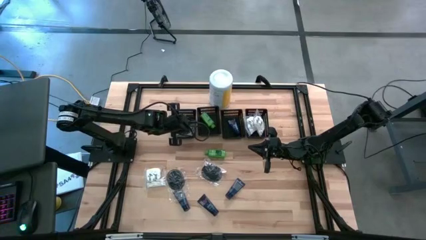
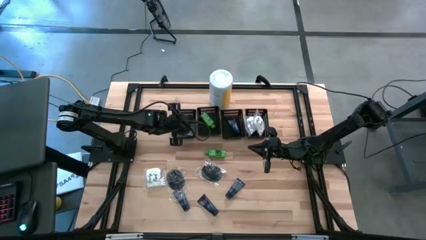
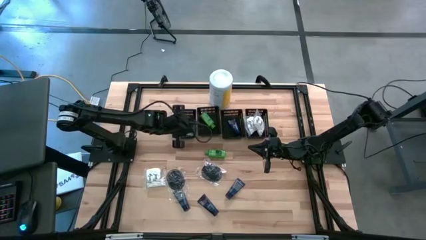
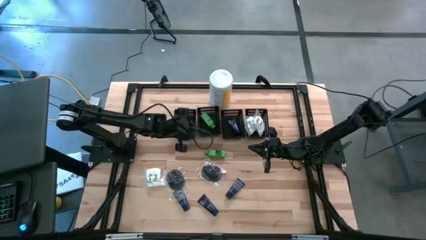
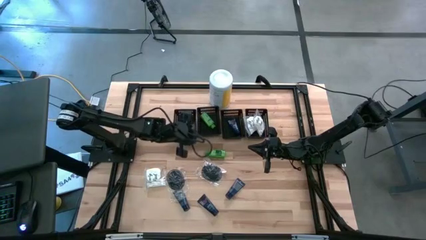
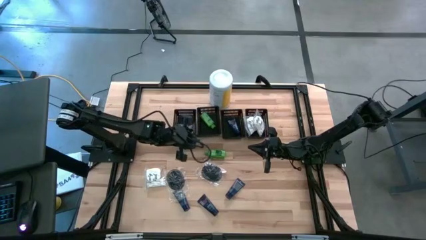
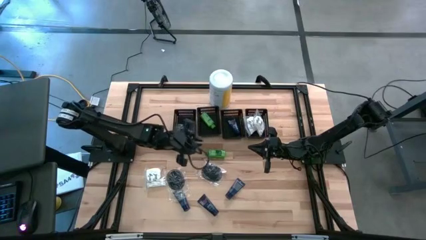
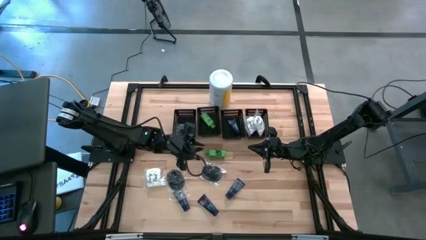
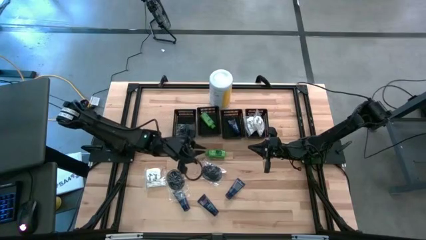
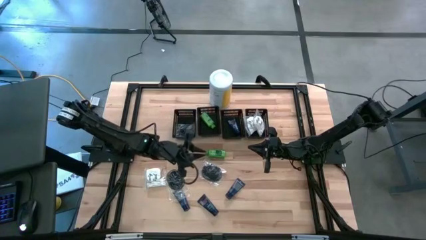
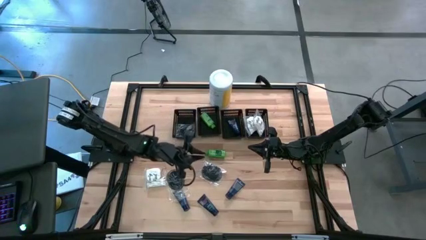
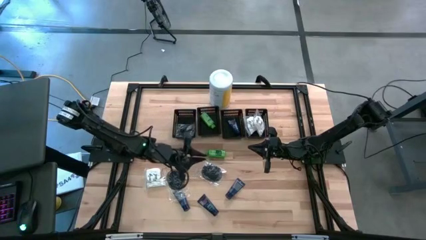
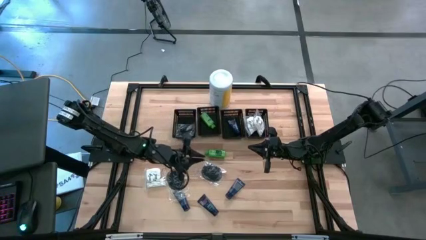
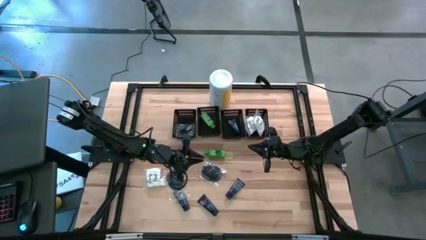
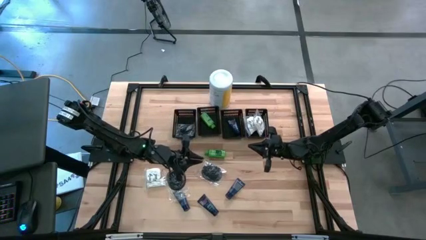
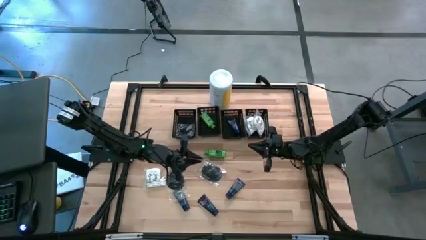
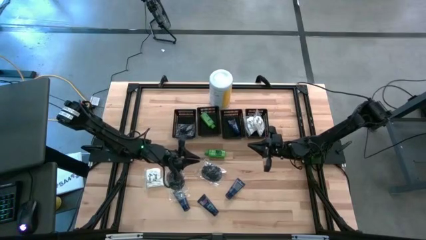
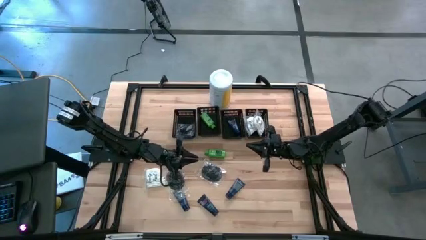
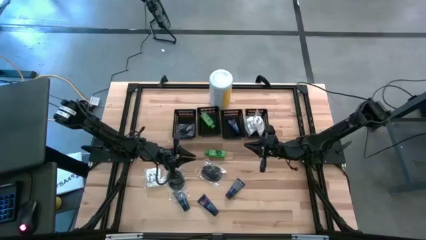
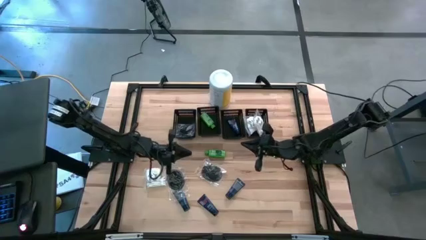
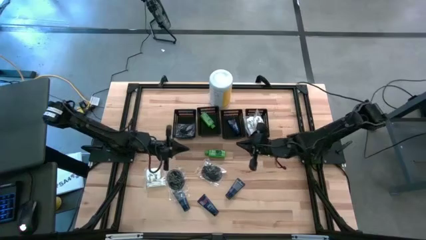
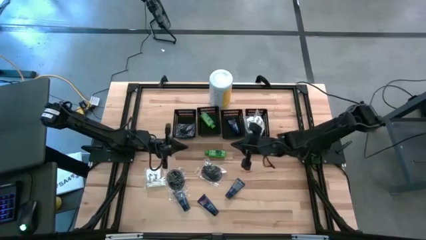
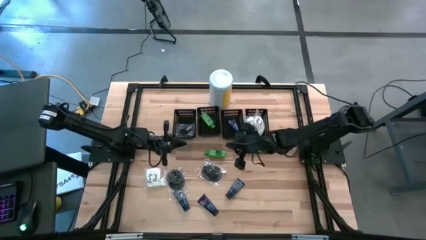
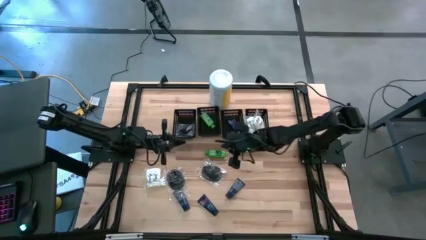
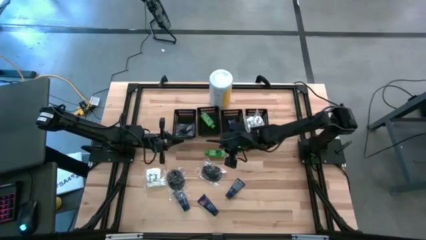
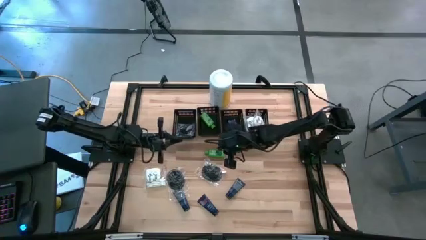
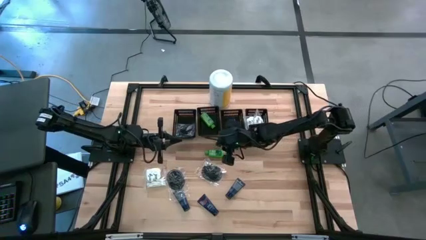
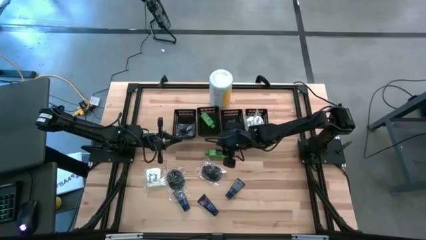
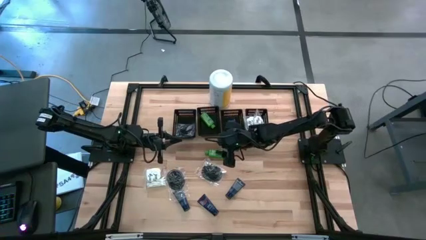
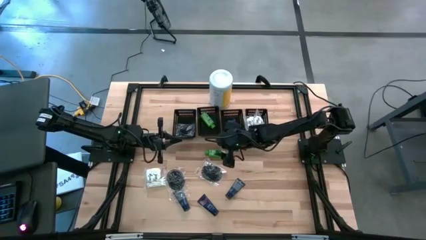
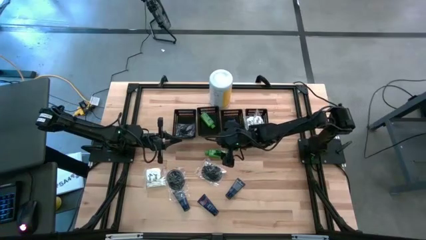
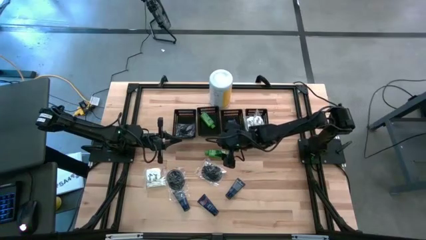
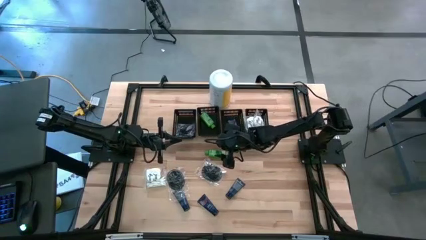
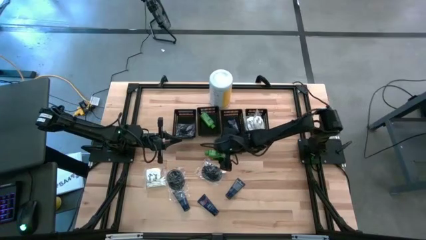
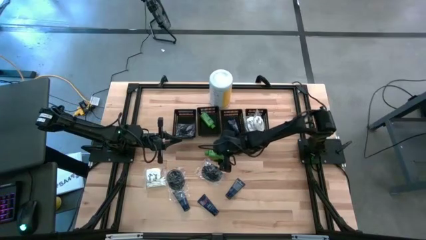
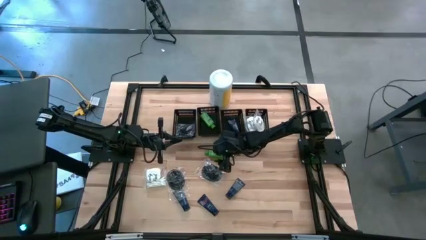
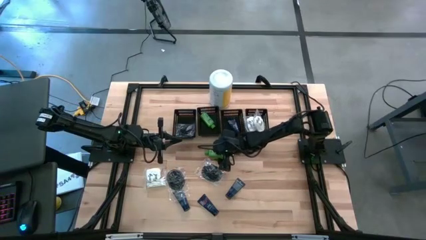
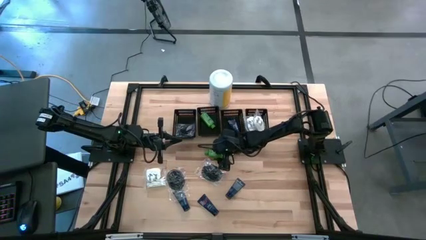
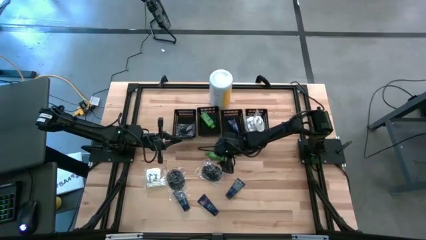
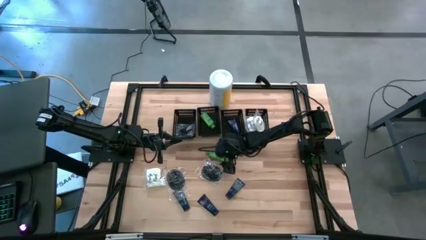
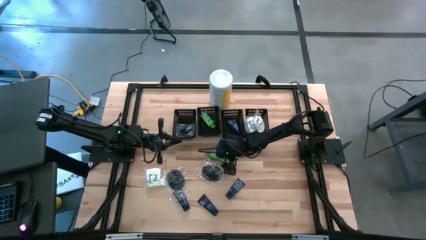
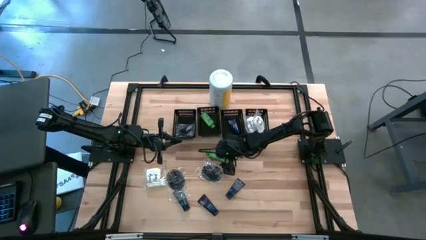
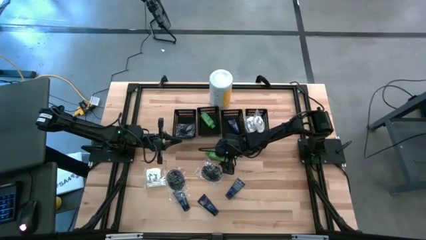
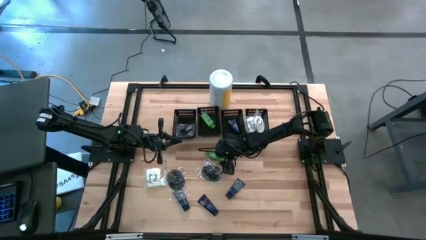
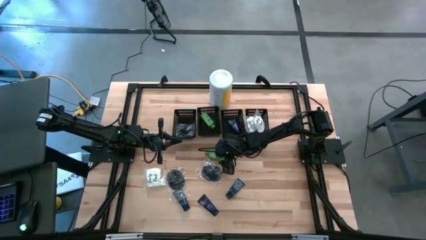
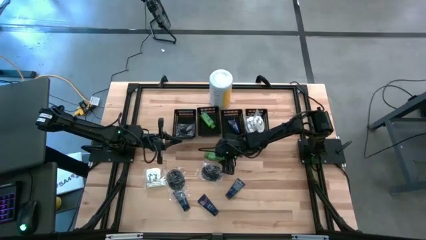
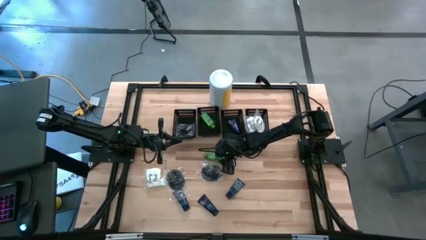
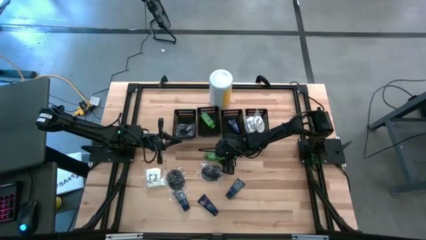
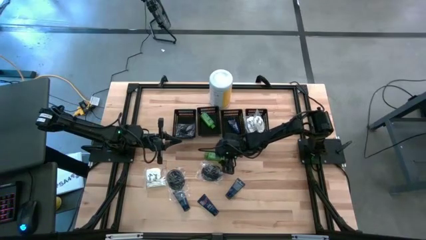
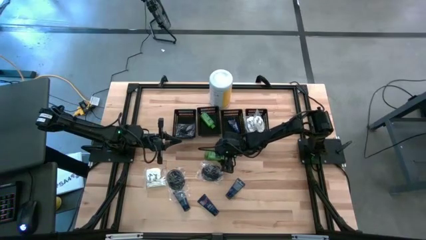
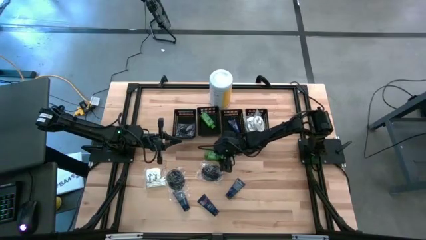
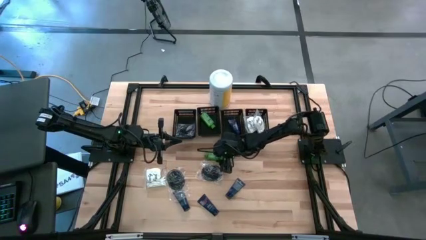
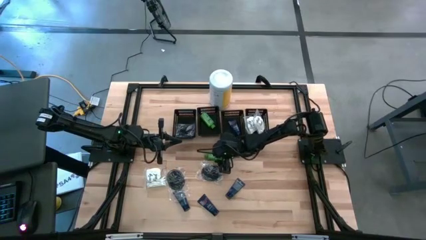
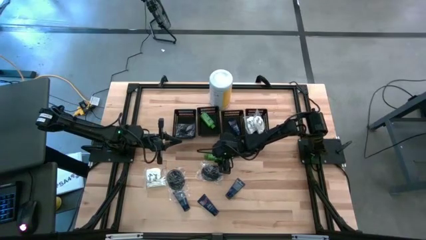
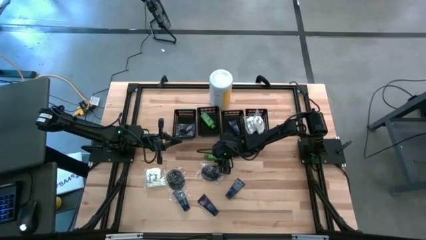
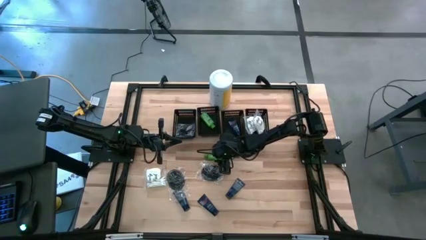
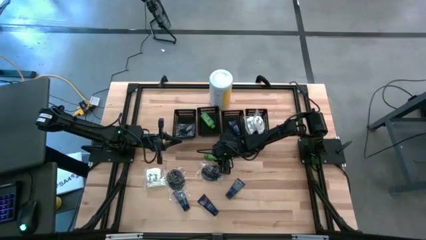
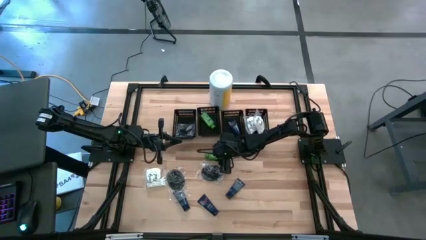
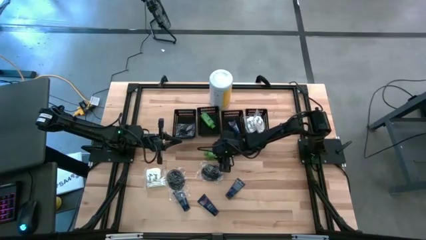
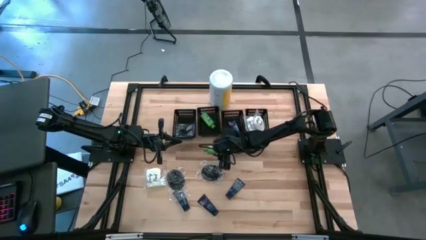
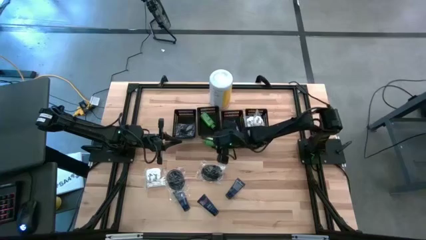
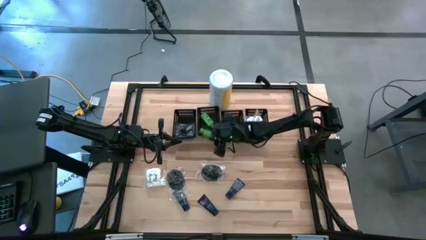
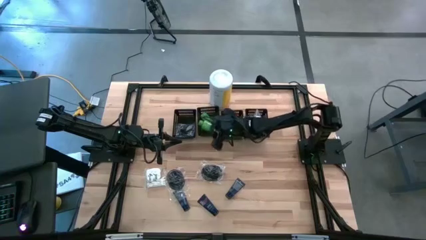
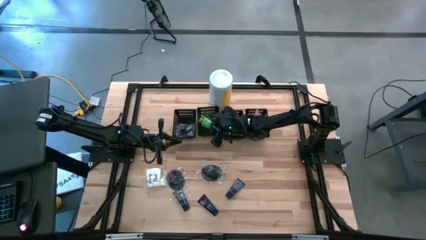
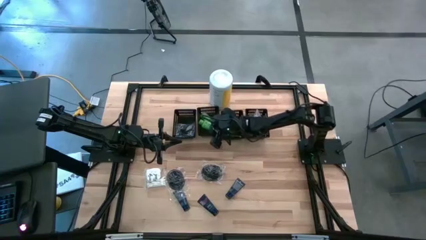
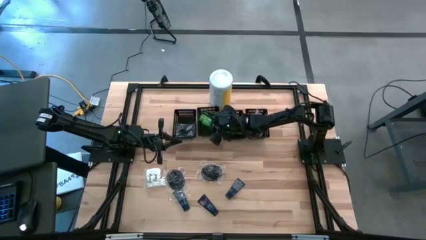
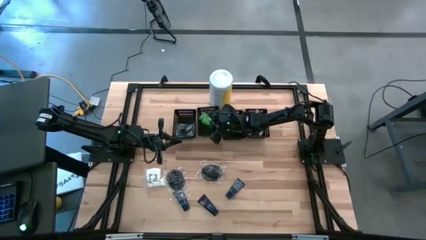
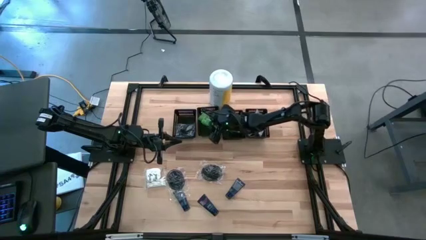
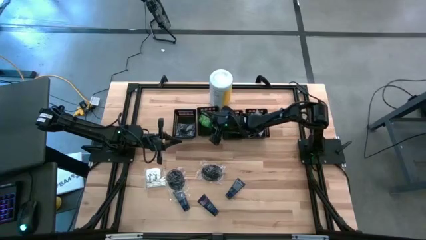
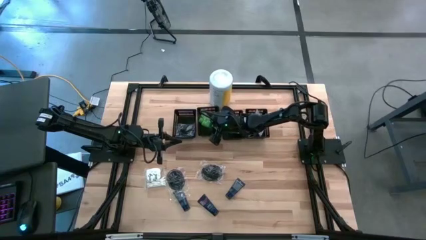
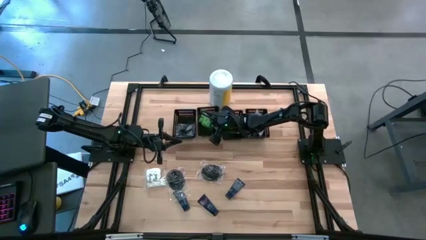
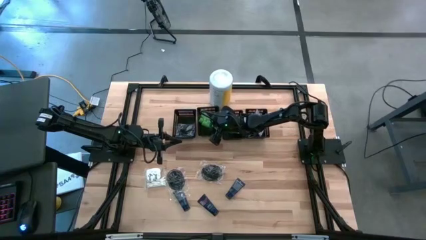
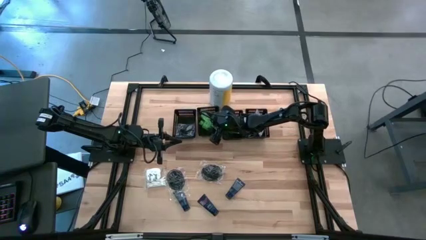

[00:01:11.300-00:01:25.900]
Task: Pick & Place Travel size toiletries
Put the shampoo into the middle left black bin

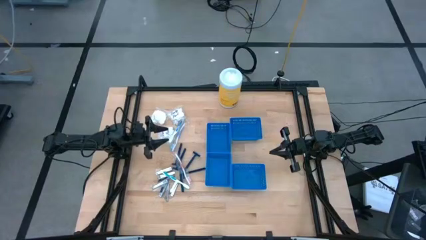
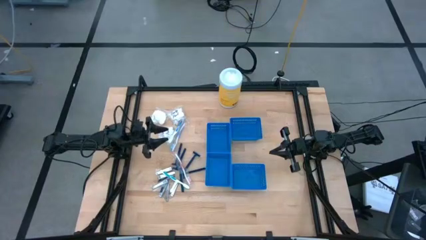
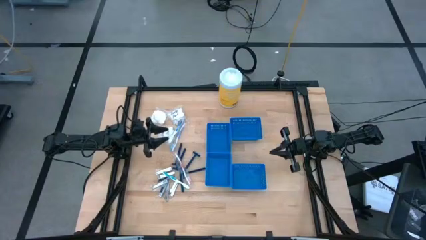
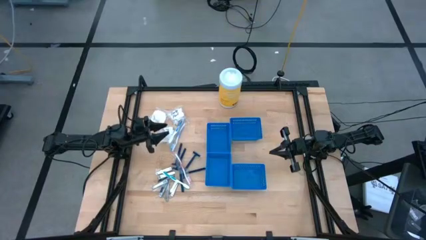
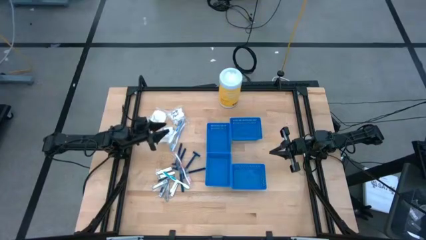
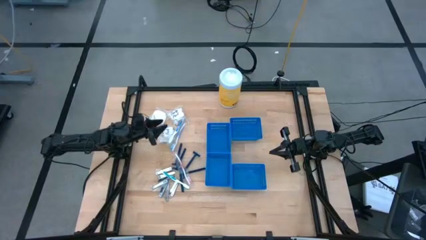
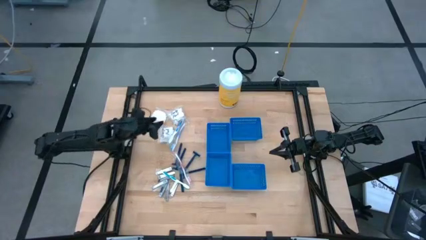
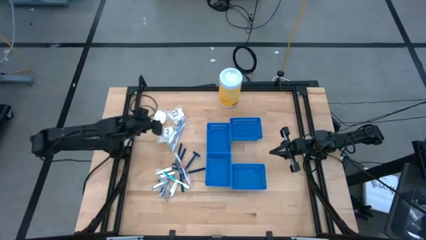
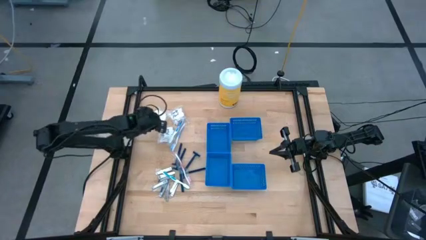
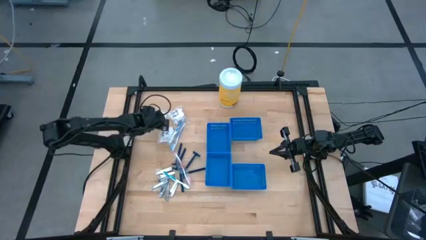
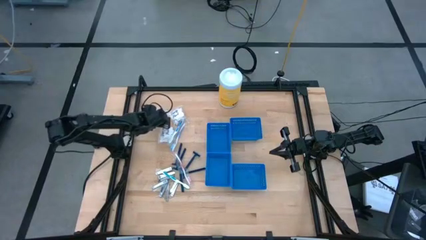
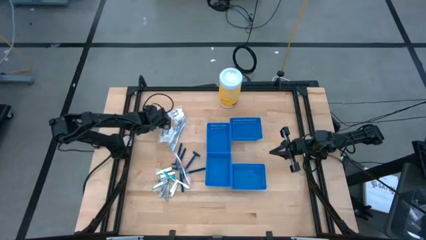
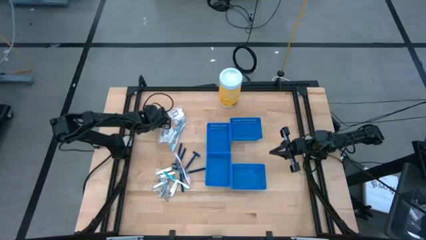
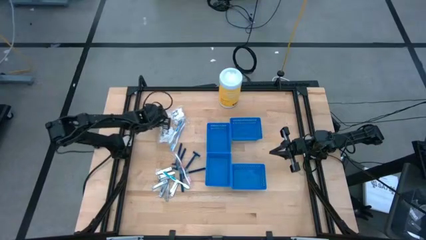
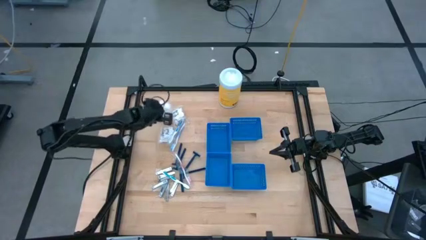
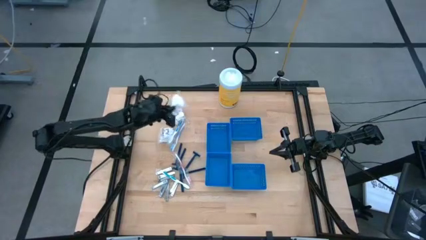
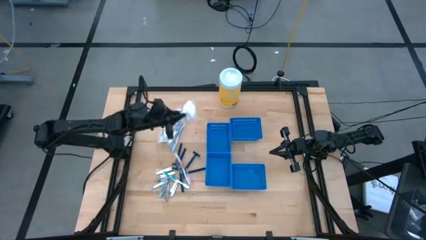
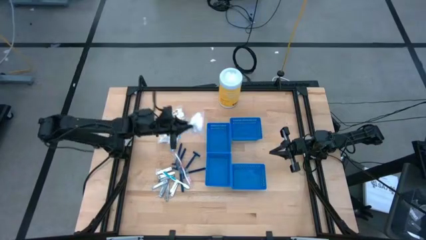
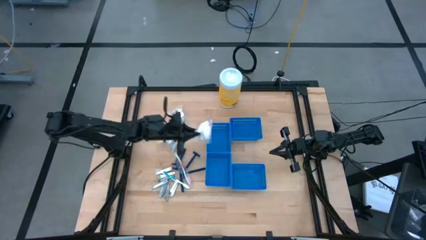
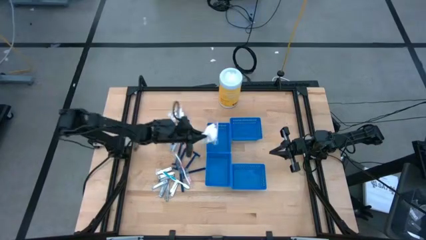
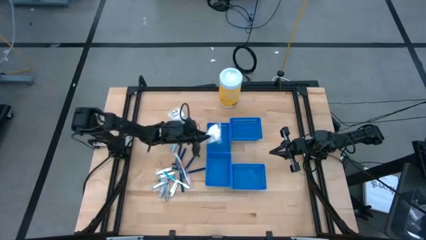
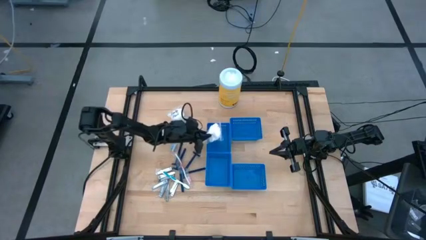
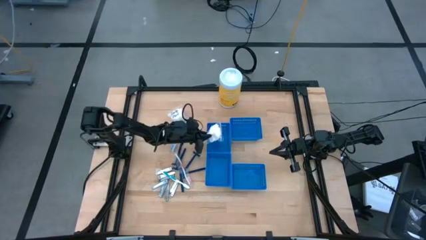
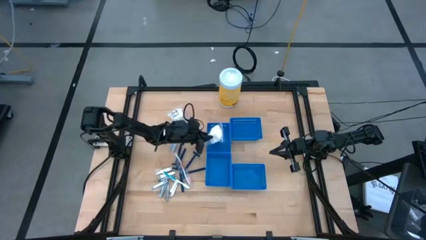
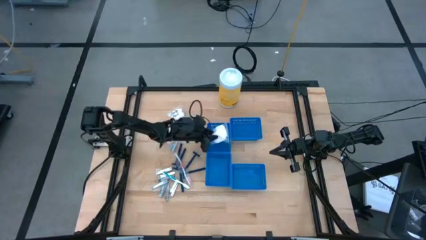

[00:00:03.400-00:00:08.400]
Task: Pick & Place Travel size toiletries
Put the transparent cotton pack into the top left blue bin
